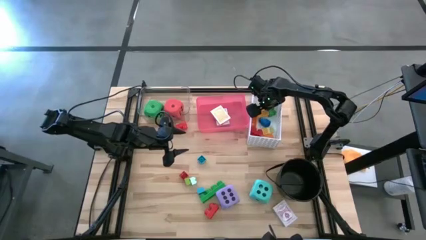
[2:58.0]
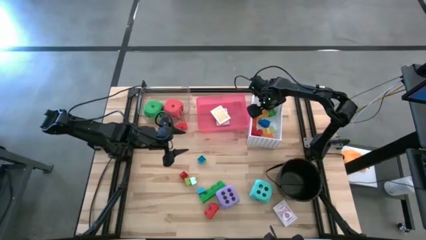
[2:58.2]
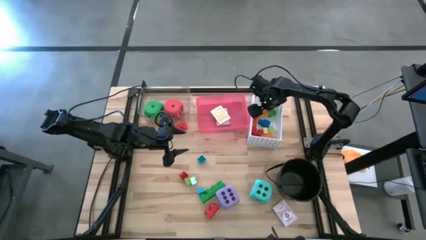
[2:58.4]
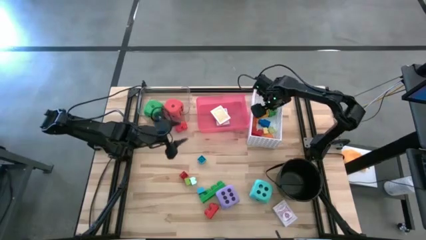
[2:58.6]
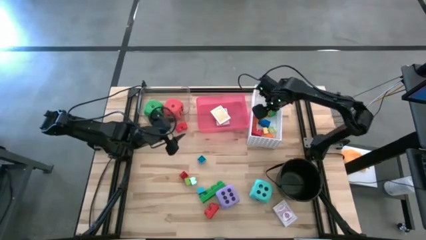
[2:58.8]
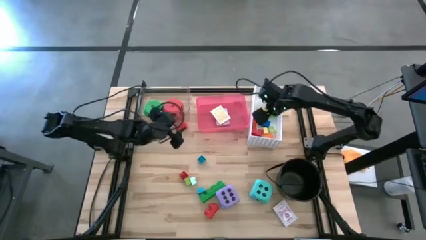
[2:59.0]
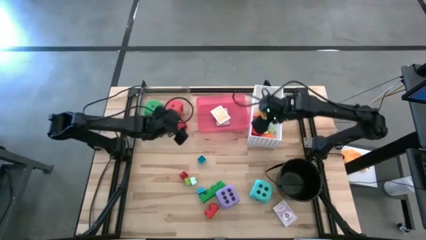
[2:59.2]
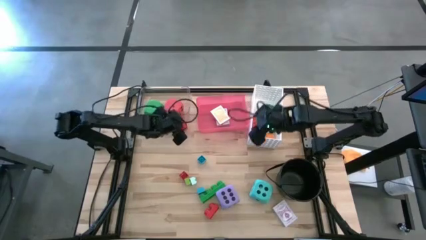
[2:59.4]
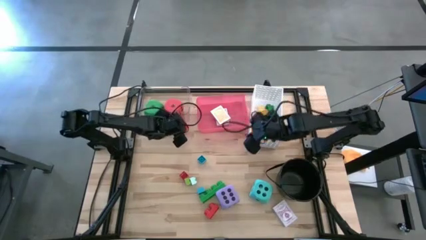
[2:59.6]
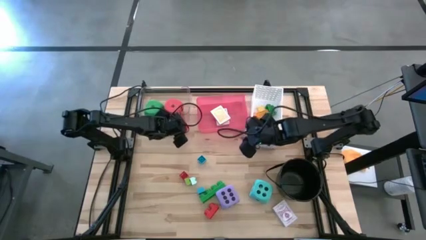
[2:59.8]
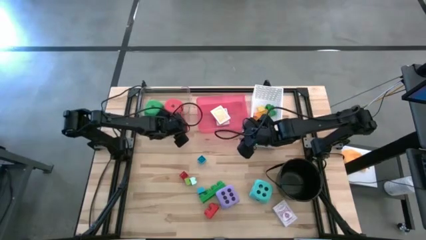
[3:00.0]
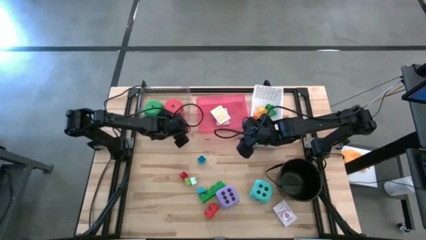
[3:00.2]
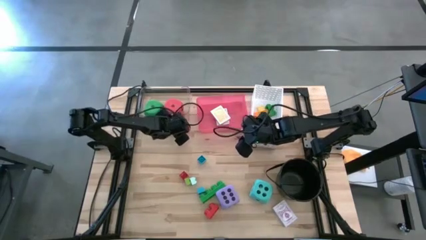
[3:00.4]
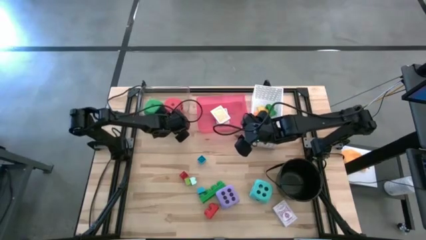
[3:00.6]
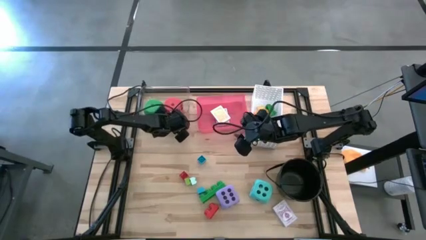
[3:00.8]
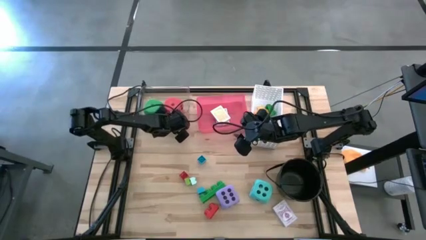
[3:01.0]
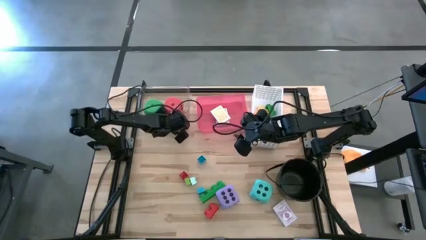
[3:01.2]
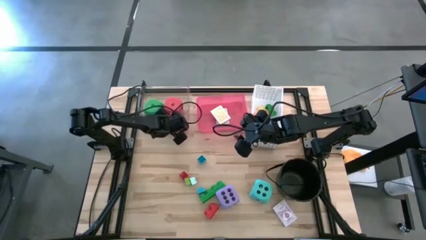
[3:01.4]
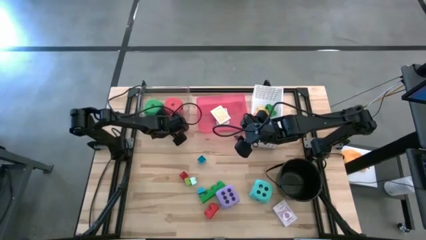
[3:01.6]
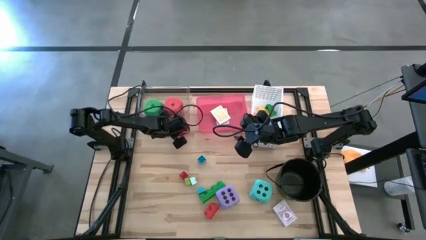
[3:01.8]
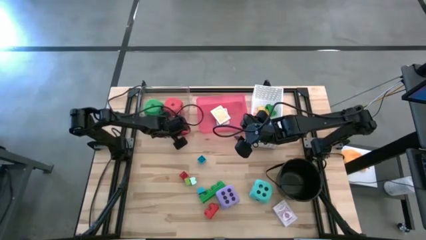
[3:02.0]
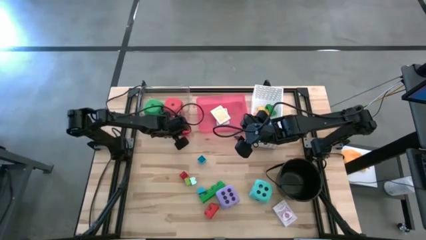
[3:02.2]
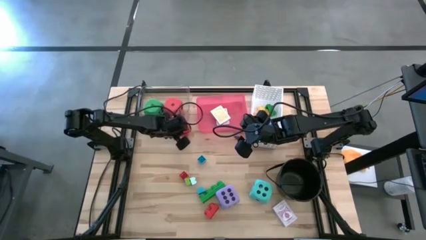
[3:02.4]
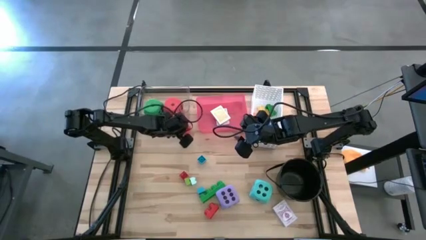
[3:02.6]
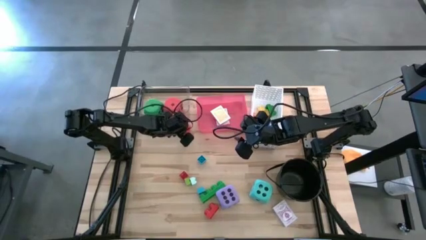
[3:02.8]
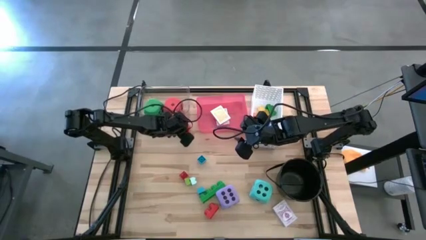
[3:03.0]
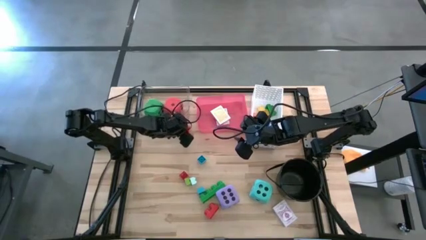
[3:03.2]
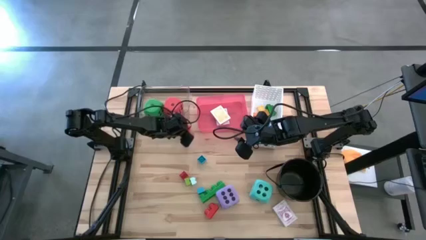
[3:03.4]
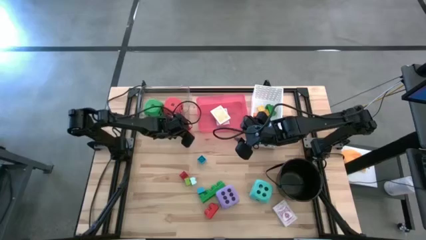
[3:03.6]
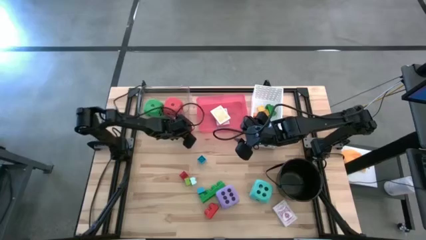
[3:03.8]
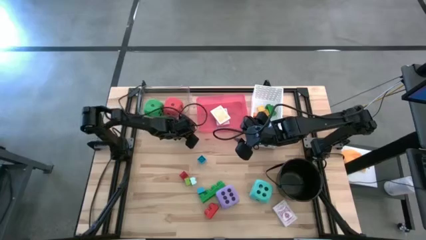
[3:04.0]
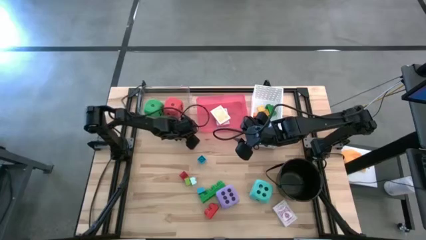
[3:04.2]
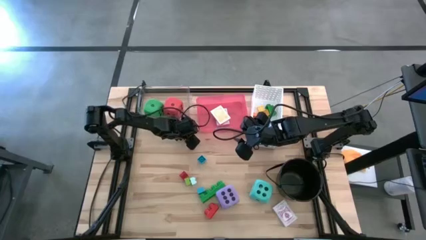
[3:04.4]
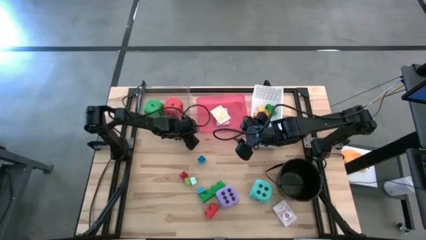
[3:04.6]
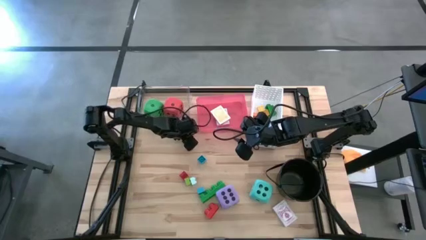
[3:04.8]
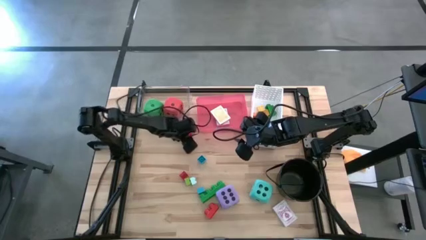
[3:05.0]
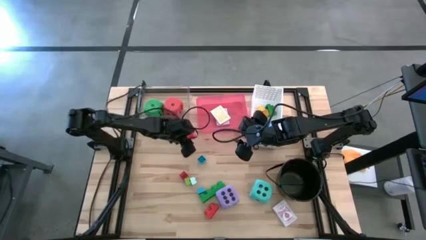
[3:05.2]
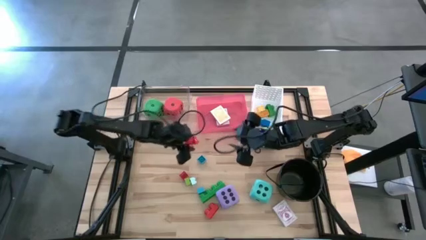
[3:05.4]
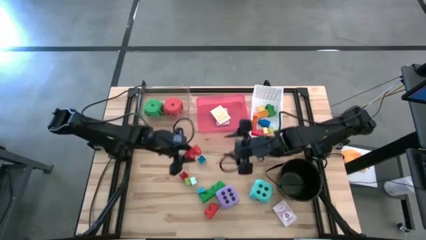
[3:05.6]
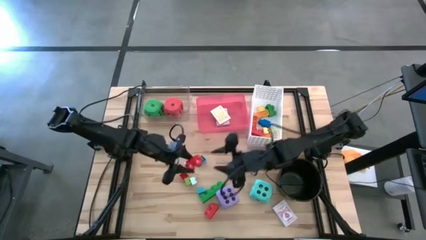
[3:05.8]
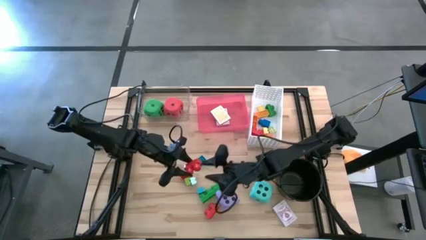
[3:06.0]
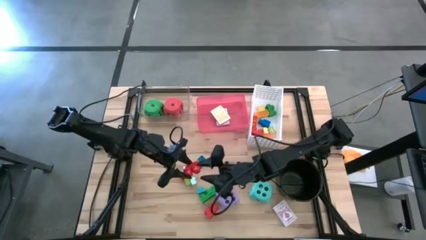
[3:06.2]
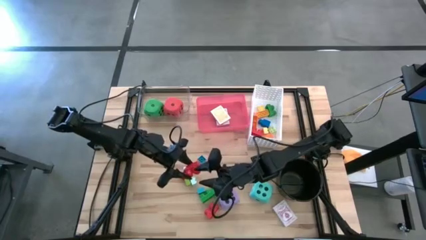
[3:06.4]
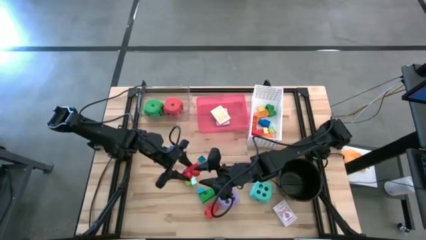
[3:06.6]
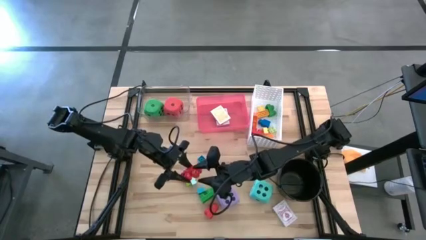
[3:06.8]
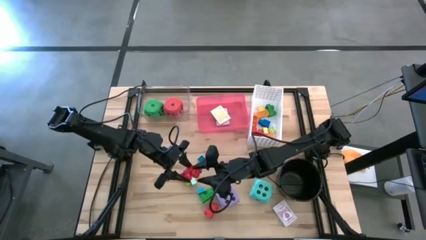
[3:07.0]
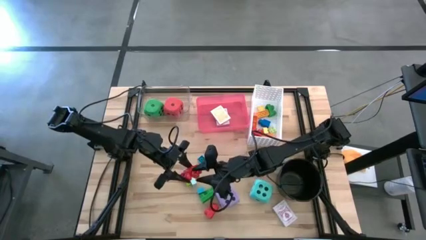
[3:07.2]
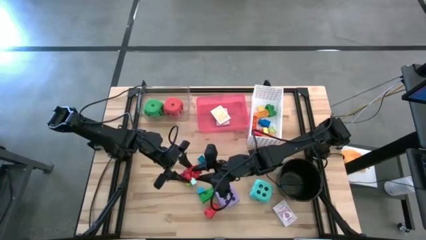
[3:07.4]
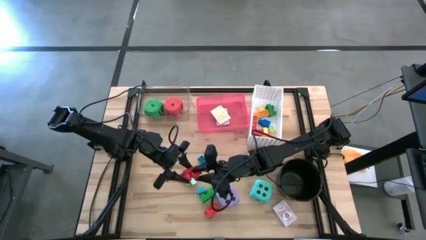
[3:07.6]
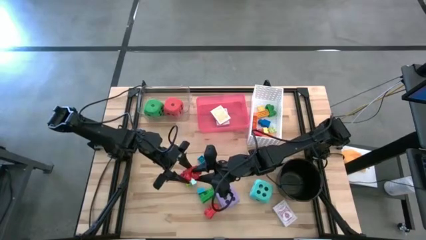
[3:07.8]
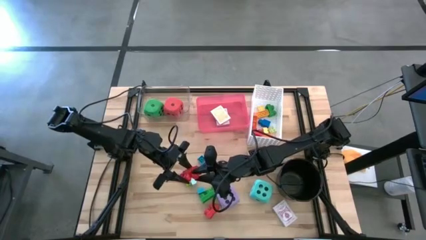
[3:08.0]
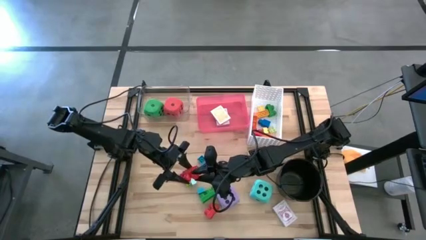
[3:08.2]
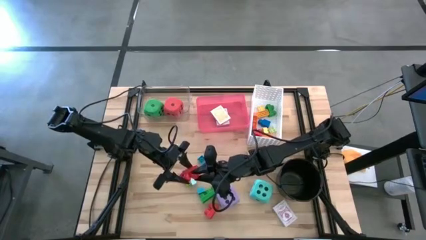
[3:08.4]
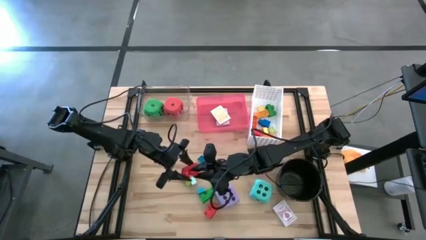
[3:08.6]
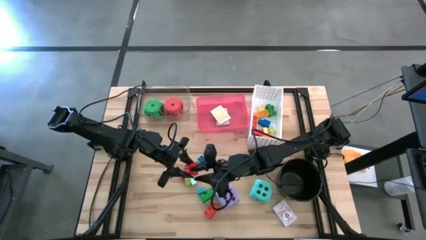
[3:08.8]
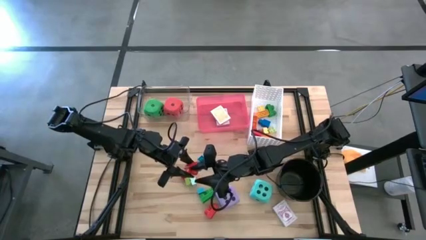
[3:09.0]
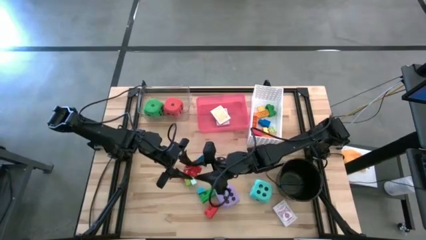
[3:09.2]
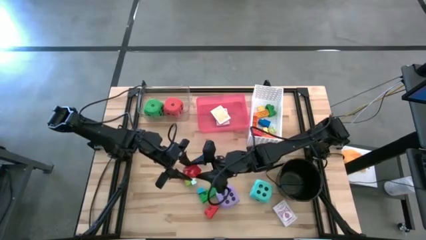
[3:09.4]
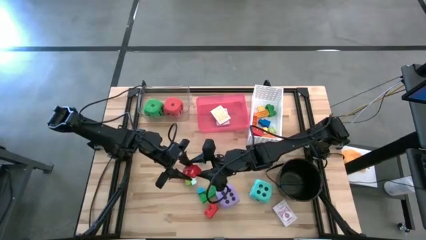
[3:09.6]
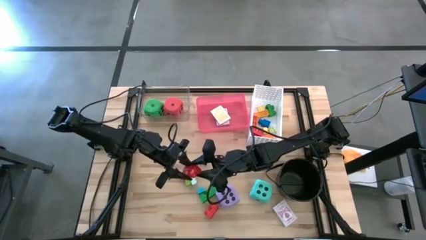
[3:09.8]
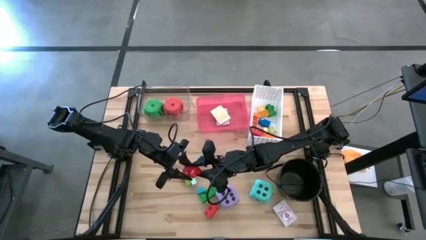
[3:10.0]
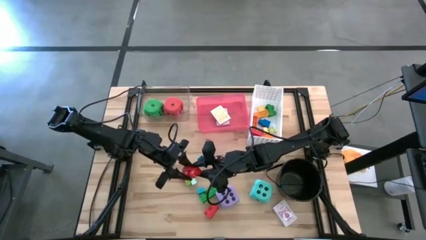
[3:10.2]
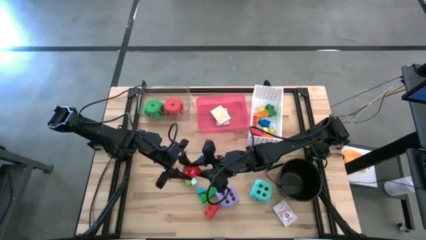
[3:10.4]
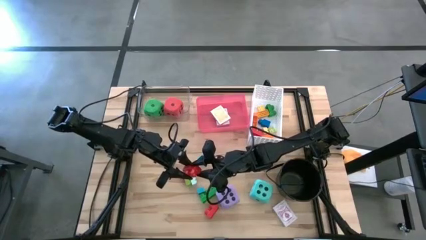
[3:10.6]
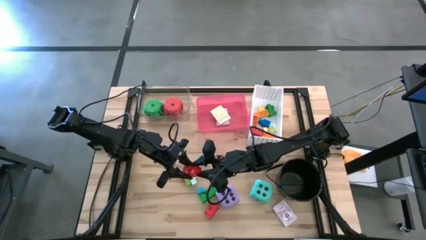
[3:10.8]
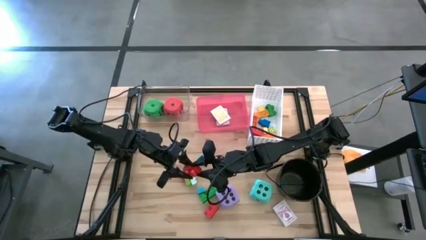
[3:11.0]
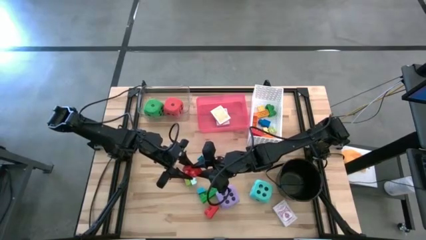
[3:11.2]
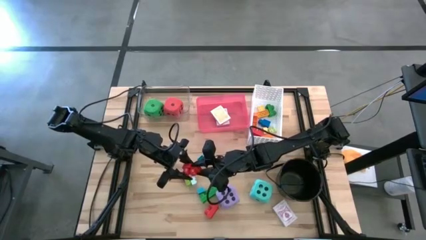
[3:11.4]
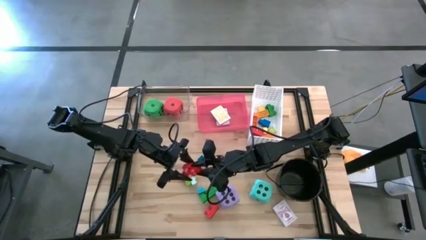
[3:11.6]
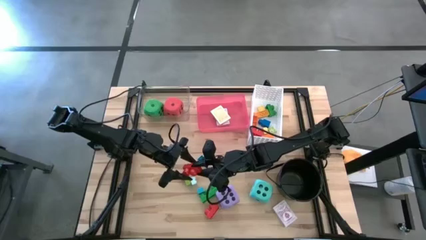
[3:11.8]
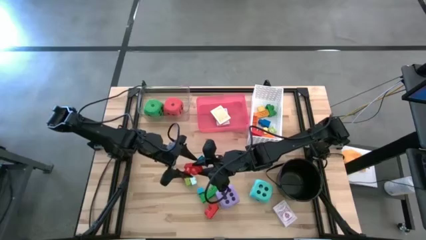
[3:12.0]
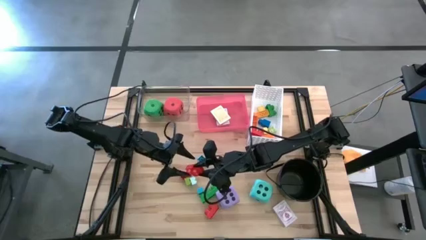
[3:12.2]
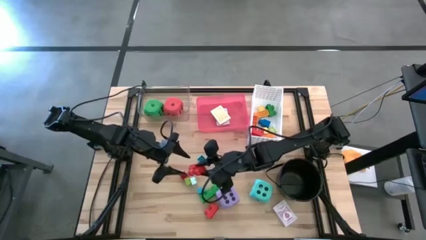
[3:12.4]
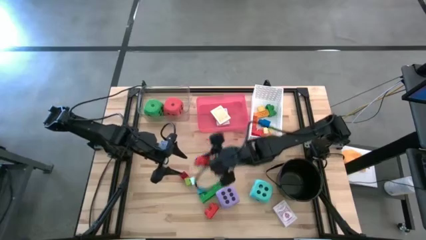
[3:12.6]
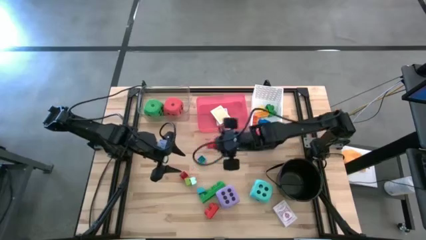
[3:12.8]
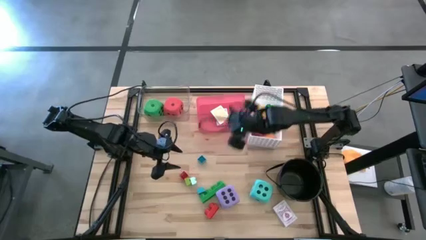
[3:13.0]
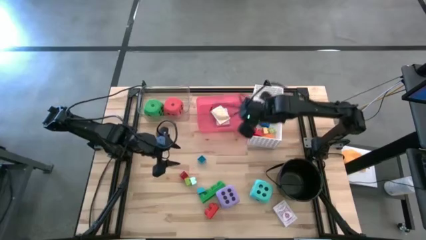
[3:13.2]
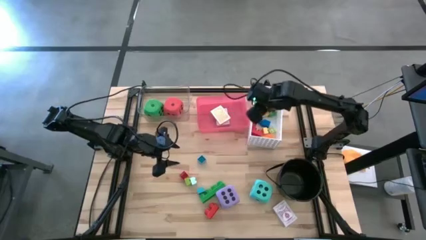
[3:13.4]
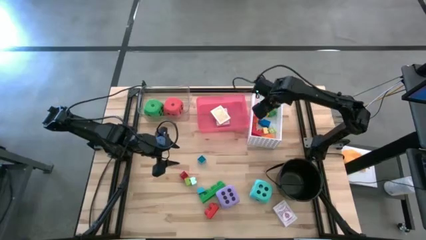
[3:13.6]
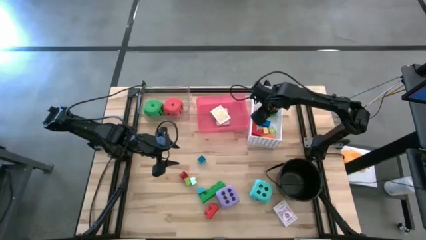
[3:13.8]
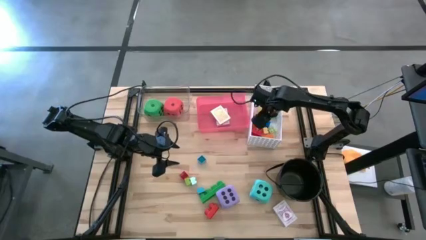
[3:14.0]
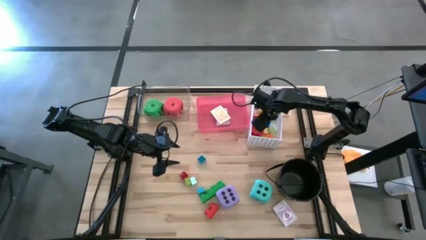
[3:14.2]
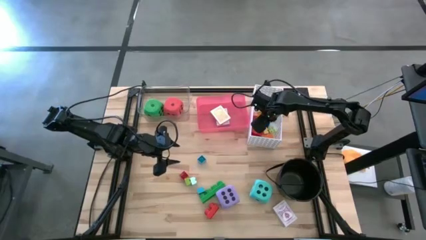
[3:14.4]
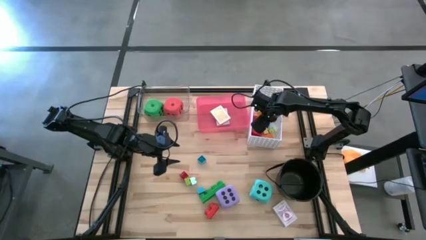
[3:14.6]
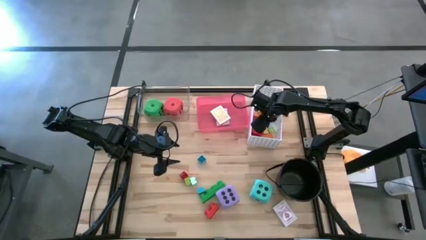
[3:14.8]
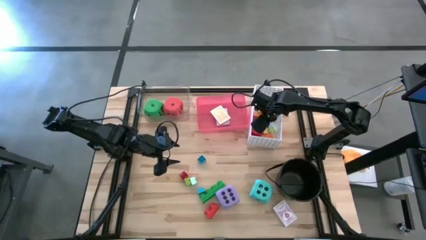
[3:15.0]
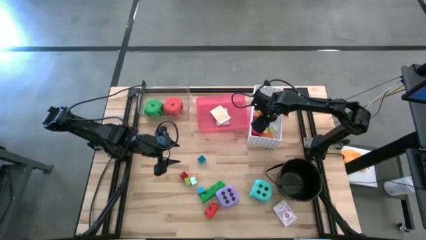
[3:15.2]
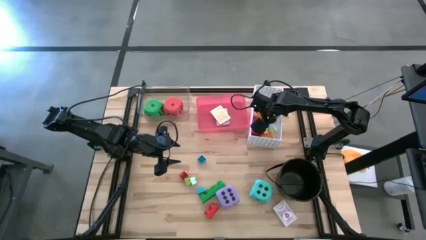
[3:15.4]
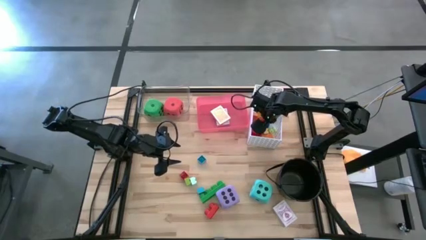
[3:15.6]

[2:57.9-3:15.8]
Task: Pick & Place Toys
Put the top large red game piece into the white bin
